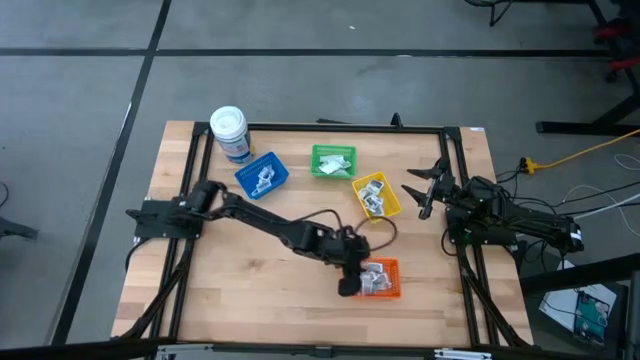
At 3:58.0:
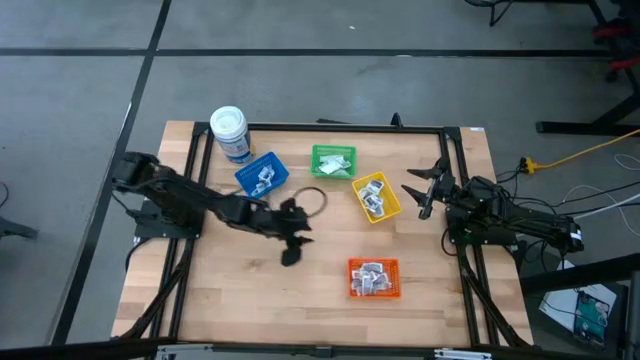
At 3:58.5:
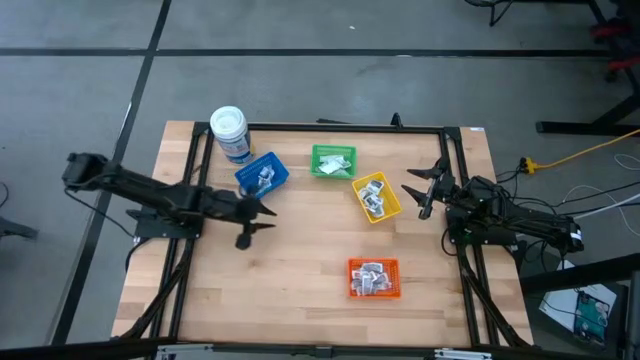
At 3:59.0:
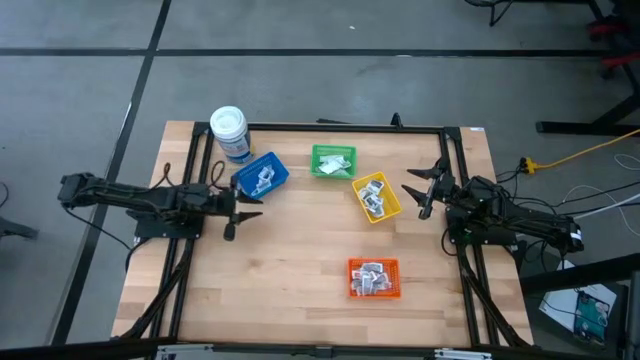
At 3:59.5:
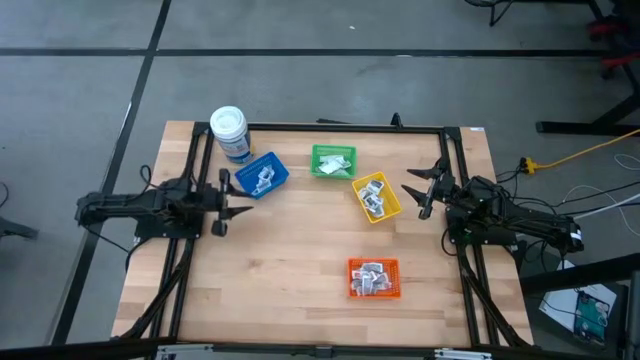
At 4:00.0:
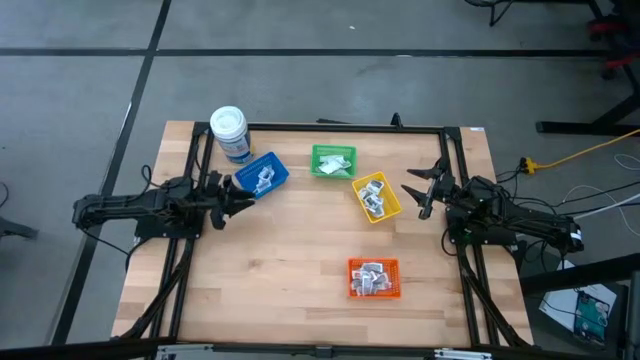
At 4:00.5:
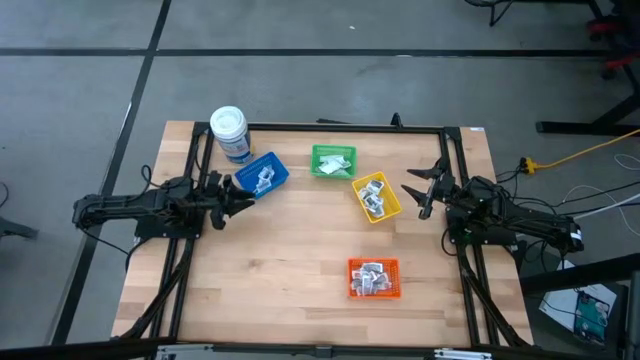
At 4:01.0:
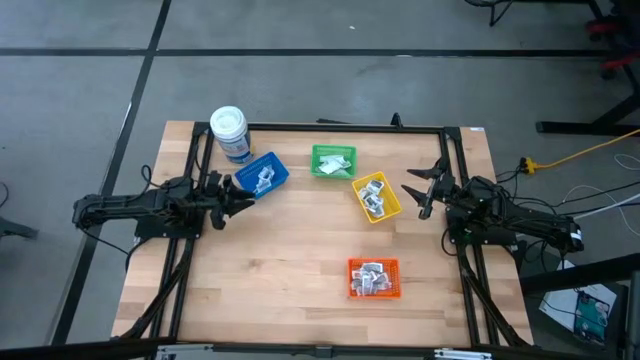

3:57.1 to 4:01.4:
Task: Pick & Place First Aid Supplies
Return to Home Position

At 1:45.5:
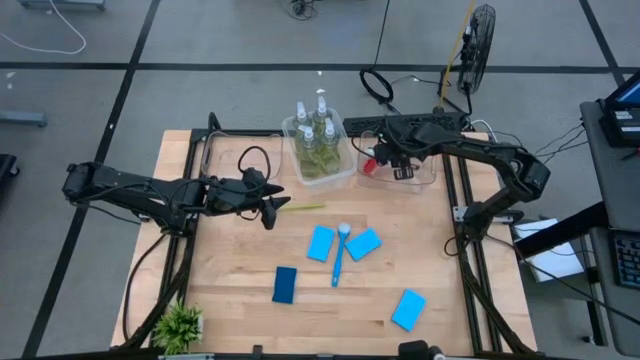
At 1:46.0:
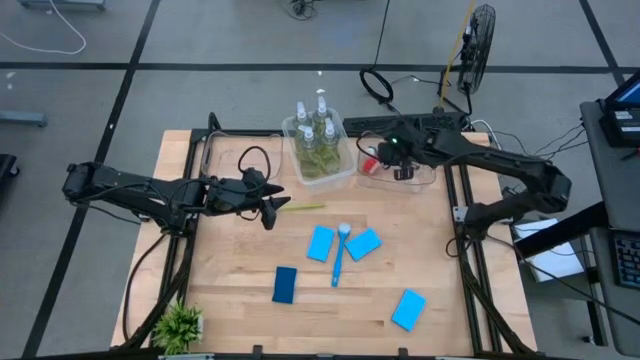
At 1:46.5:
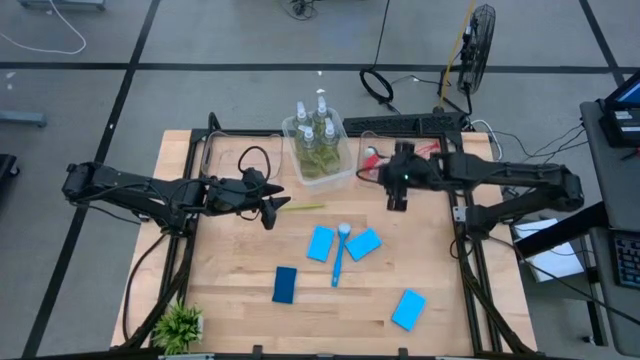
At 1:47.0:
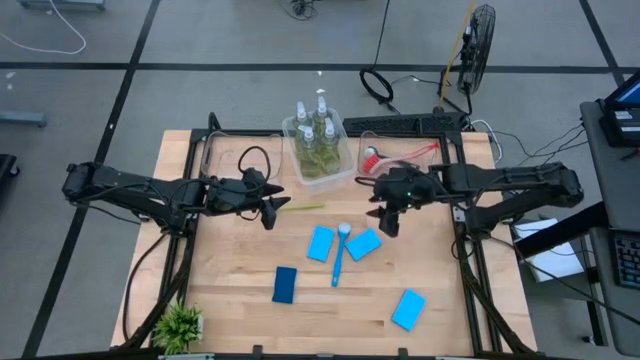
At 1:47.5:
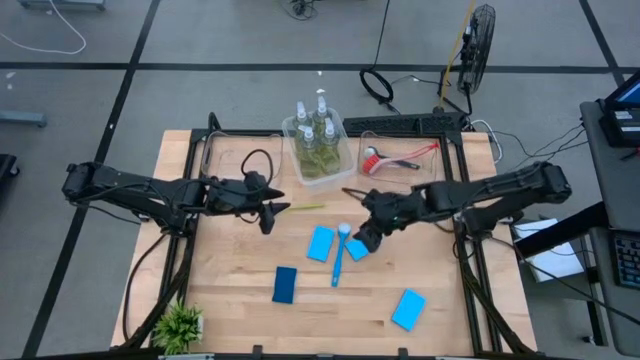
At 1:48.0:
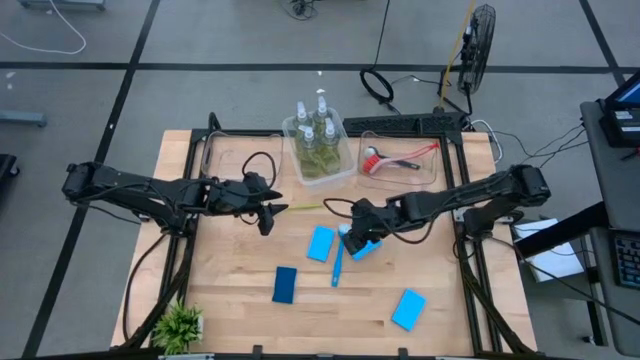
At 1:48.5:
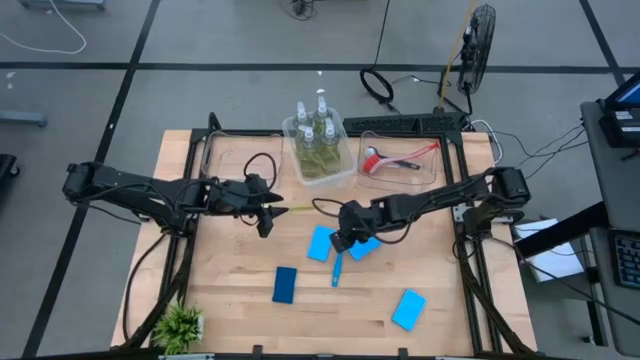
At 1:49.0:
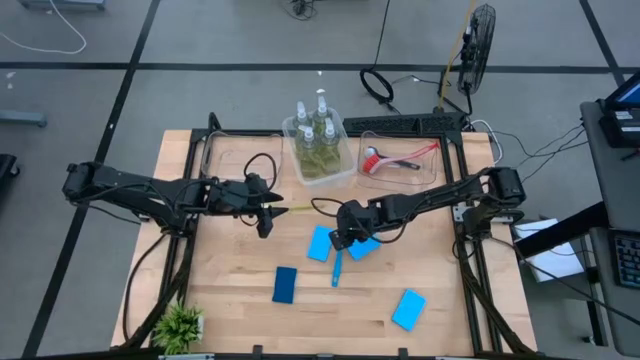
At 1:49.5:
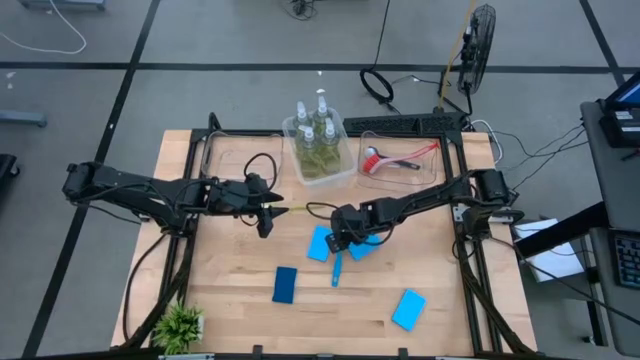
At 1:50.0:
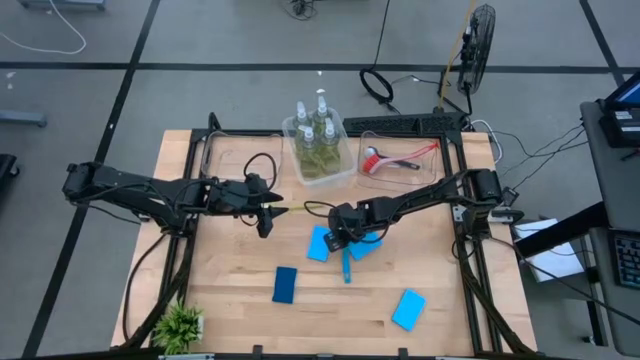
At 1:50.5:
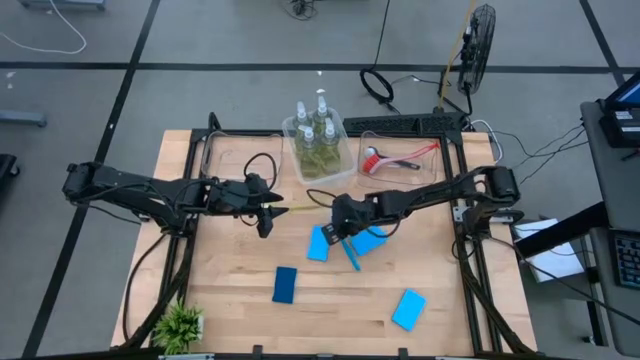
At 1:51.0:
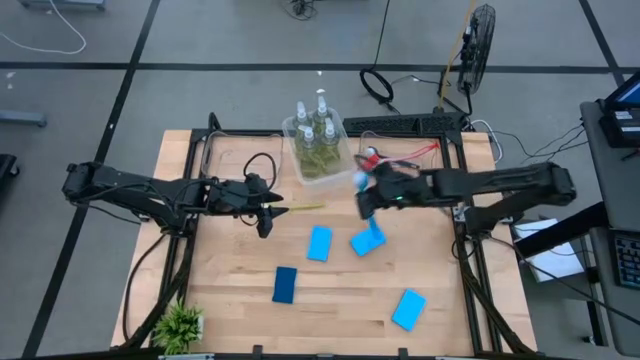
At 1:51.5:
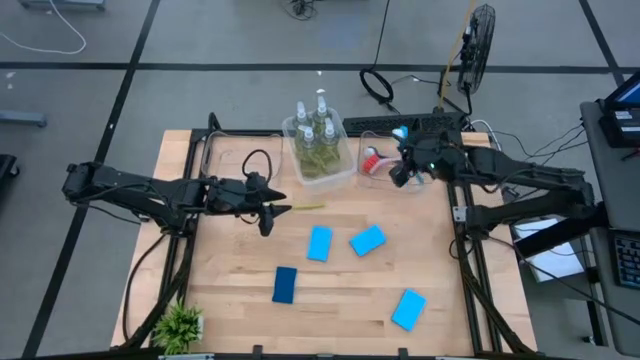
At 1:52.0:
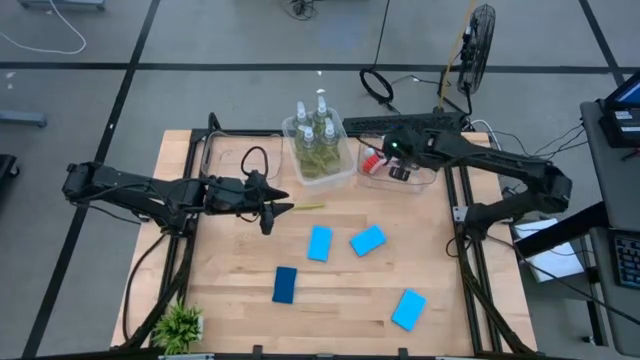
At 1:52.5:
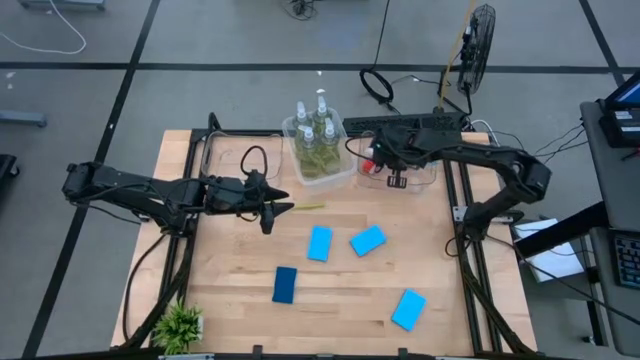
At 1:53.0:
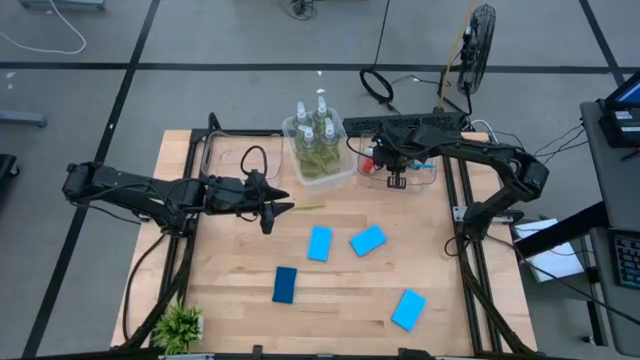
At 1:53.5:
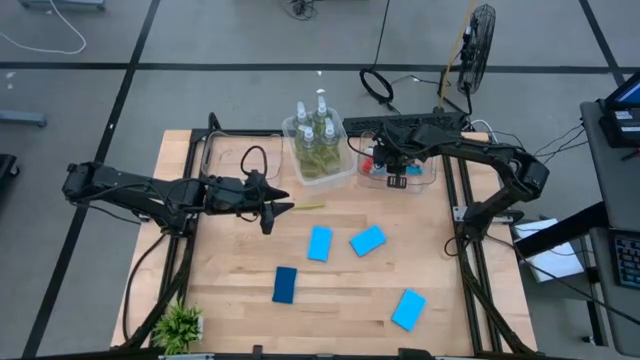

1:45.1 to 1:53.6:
Task: Pick & Place Kitchen Sink Supplies
Put the blue dish brush into the right transparent bin

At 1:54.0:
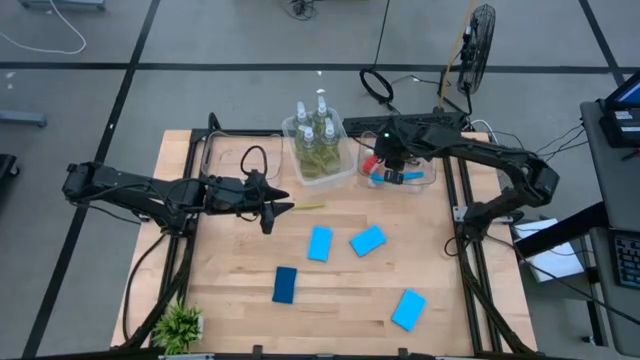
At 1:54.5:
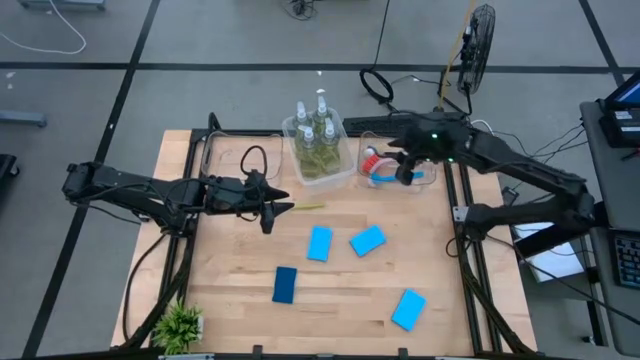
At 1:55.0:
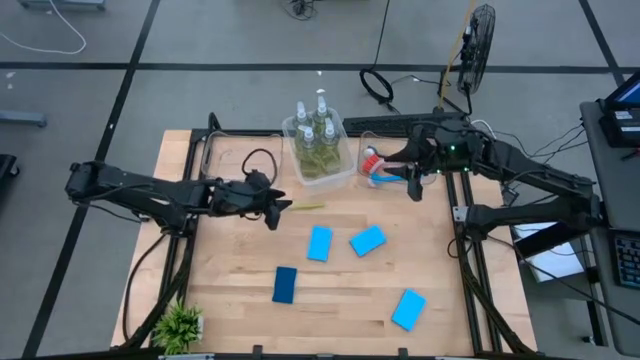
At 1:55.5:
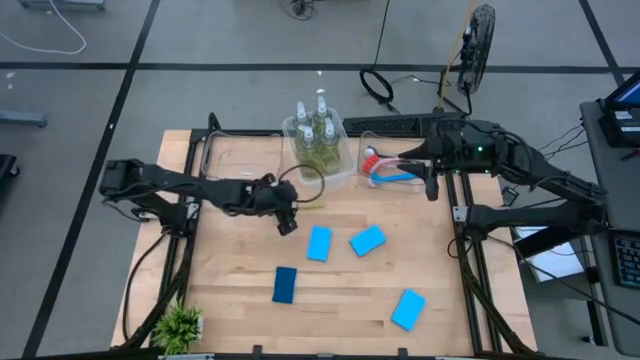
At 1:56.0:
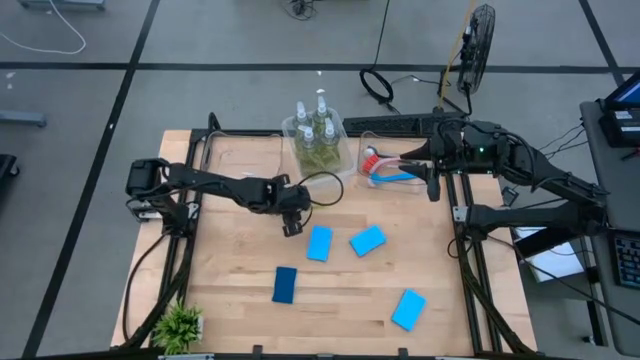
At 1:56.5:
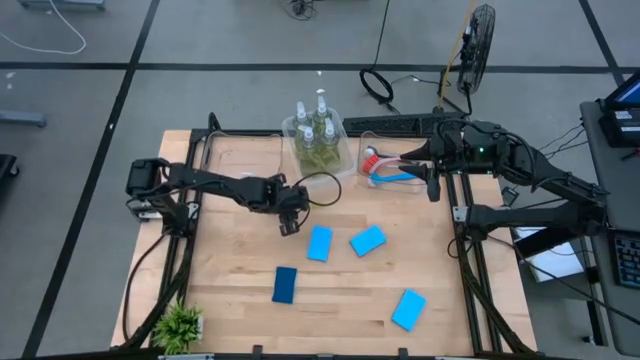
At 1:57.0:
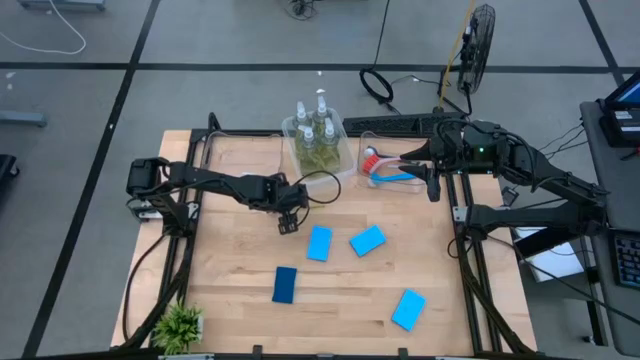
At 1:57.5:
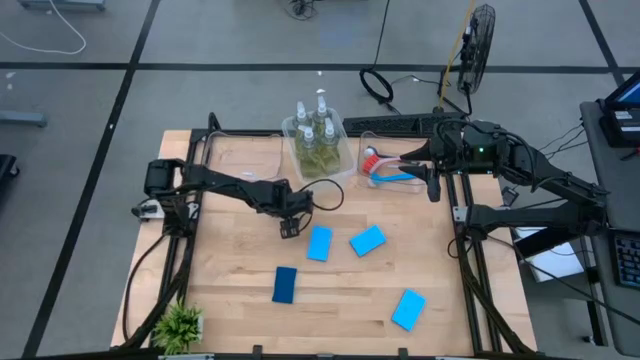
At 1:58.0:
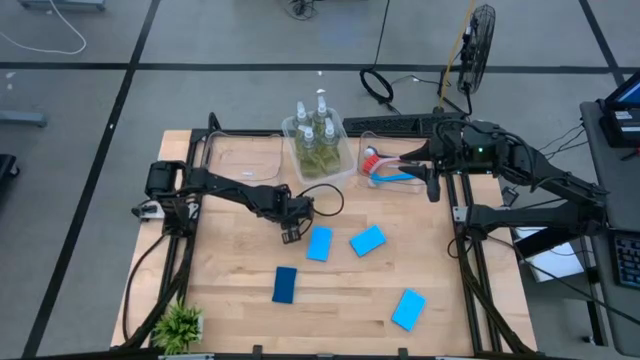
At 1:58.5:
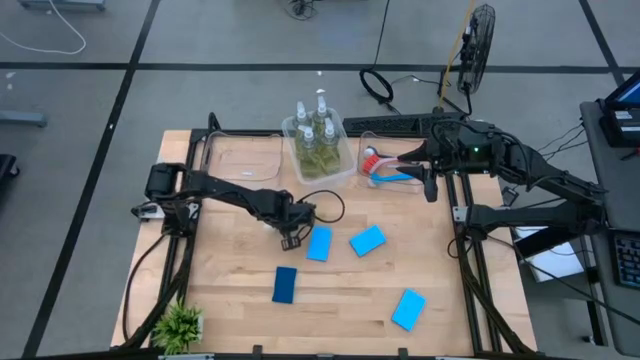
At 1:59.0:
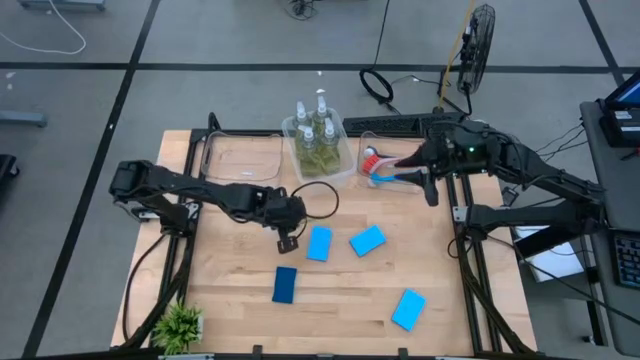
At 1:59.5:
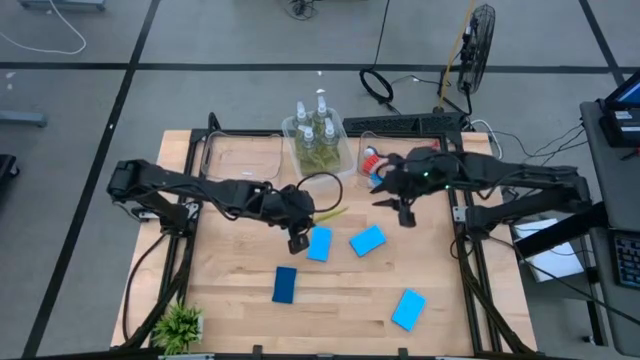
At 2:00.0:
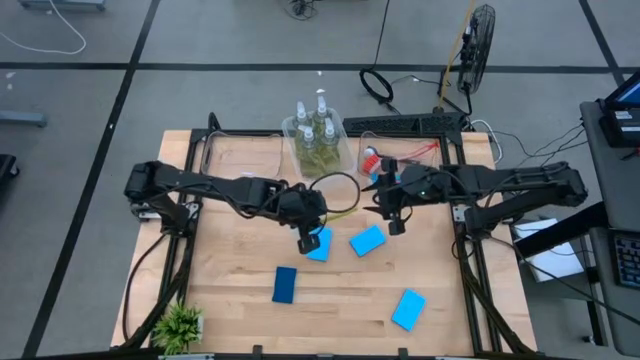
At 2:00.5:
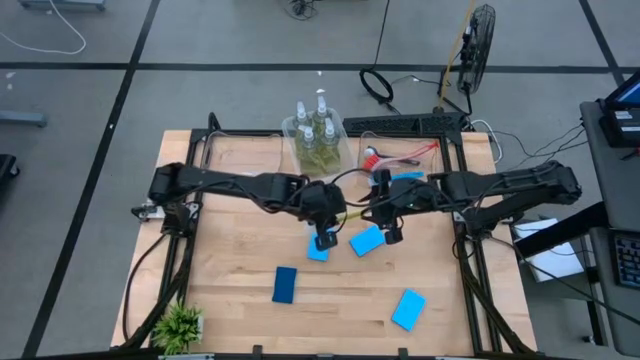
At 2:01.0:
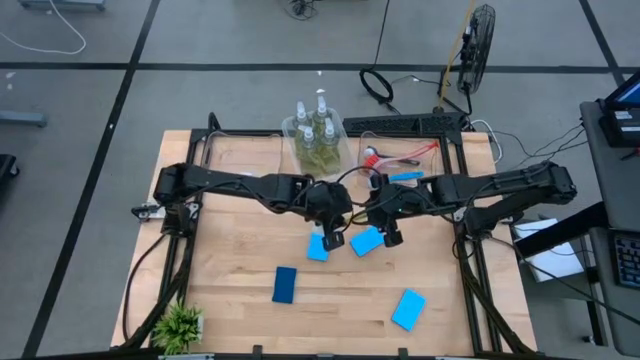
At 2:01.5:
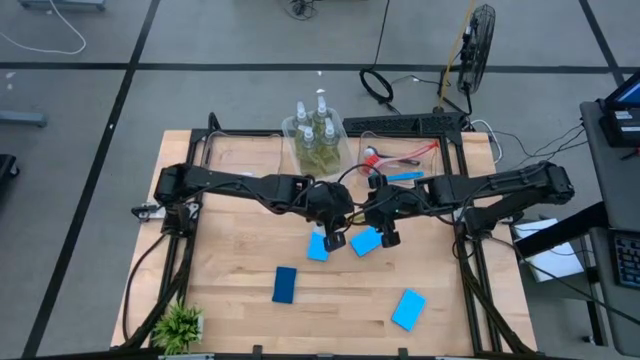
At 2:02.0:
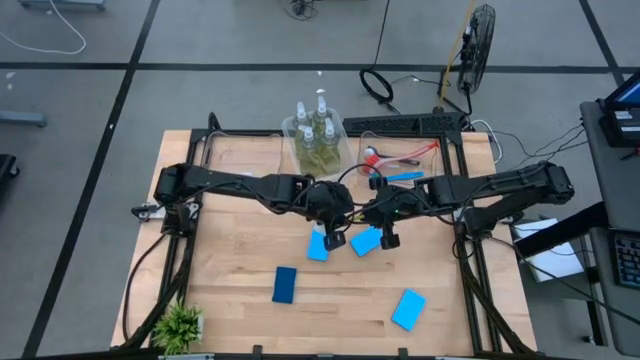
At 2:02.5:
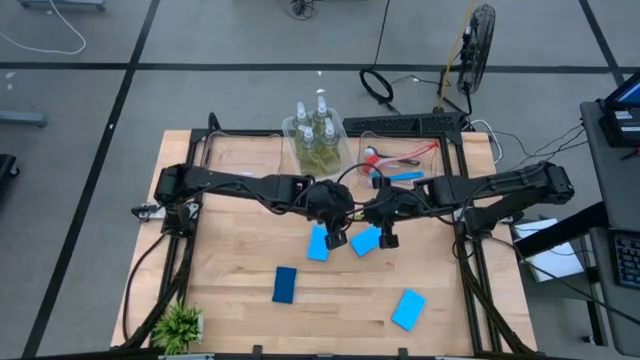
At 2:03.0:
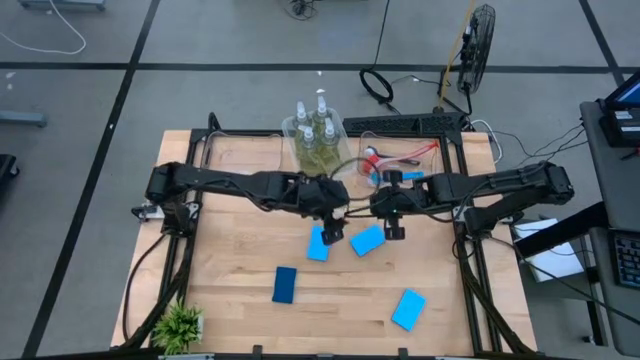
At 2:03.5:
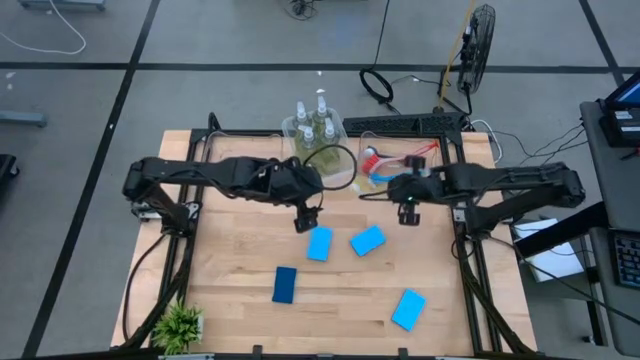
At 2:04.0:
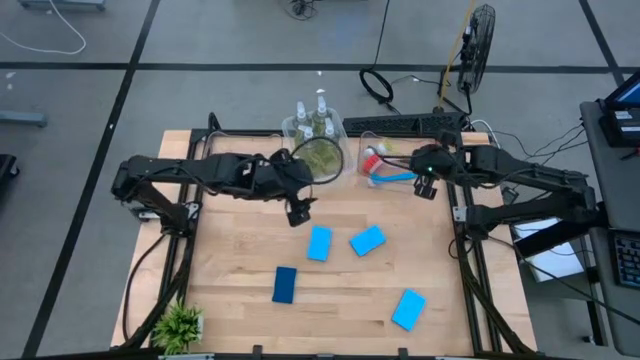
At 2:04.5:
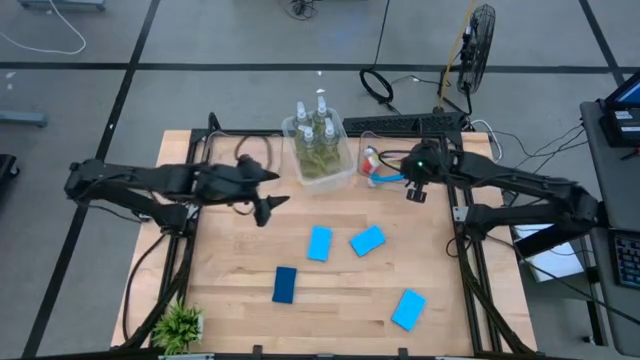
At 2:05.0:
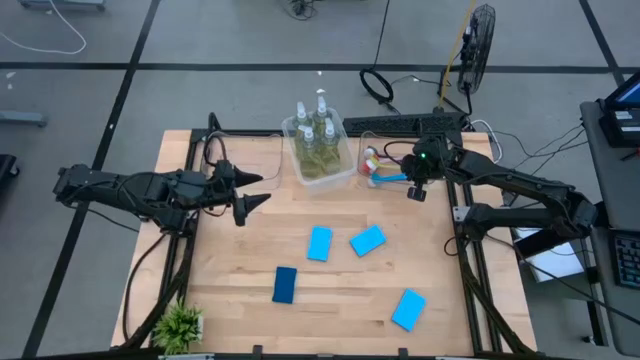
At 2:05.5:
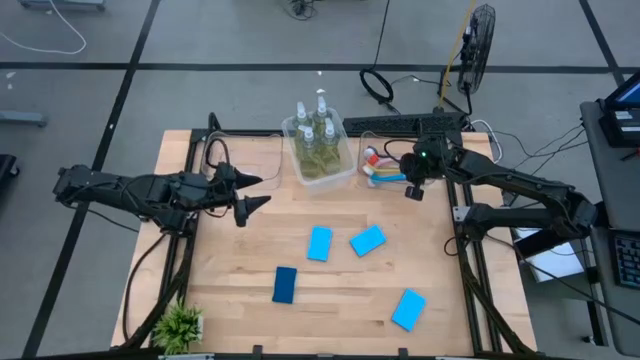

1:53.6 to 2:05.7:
Put the green dish brush into the right transparent bin
